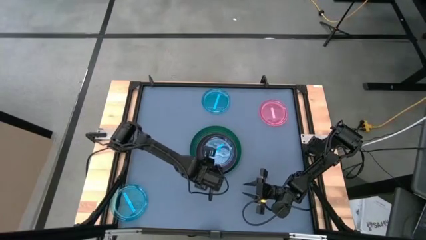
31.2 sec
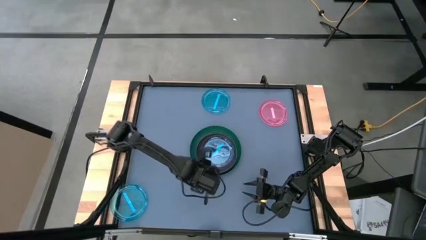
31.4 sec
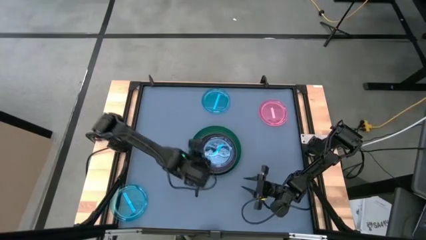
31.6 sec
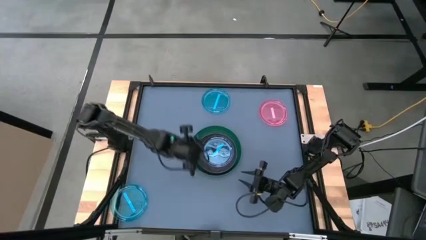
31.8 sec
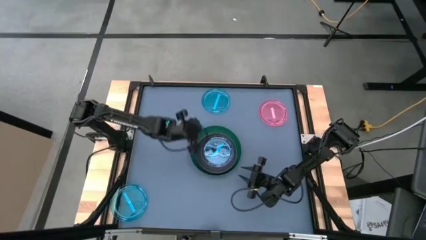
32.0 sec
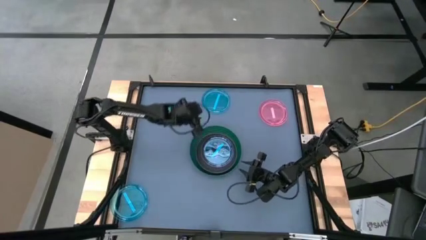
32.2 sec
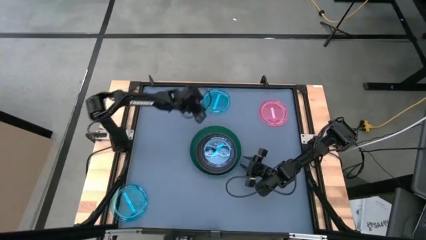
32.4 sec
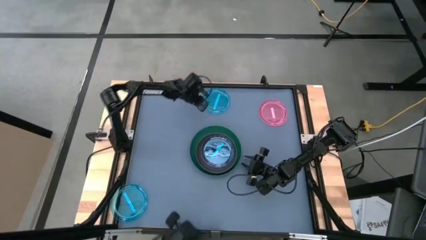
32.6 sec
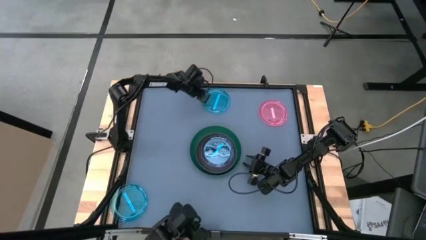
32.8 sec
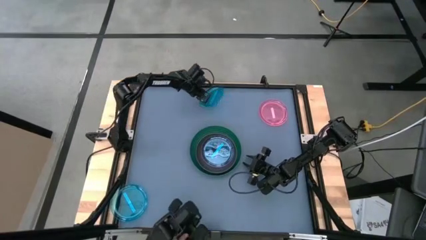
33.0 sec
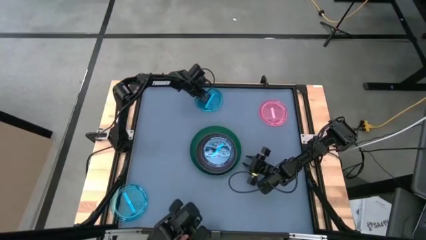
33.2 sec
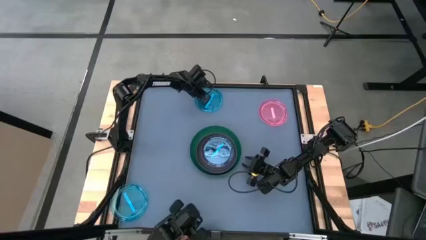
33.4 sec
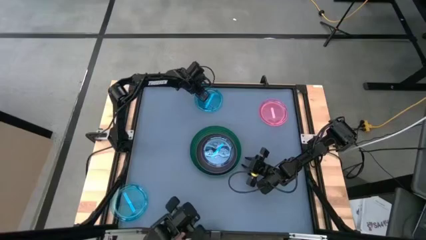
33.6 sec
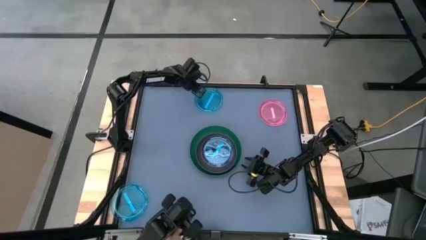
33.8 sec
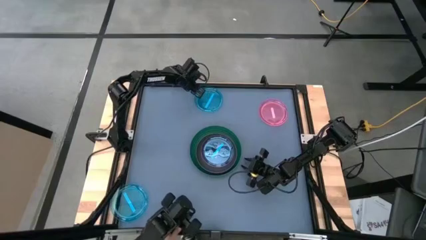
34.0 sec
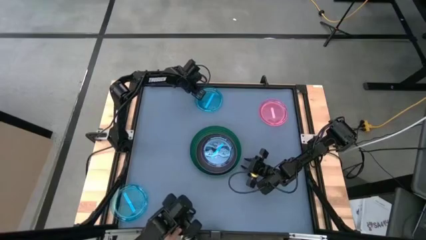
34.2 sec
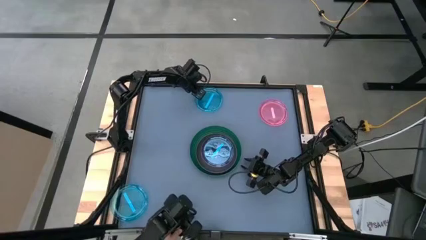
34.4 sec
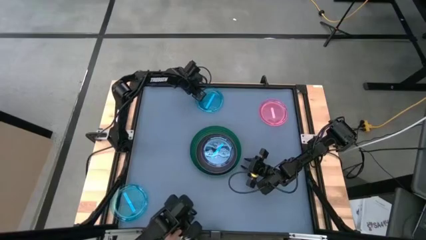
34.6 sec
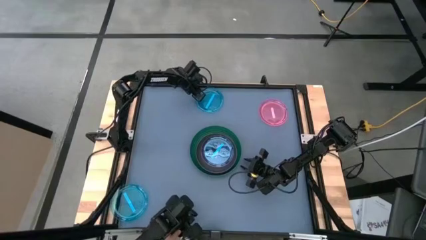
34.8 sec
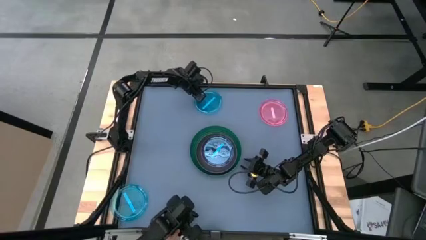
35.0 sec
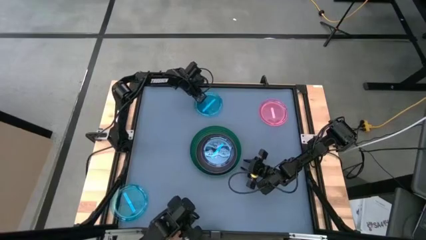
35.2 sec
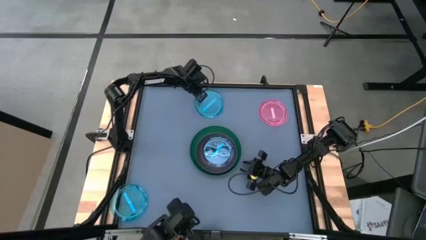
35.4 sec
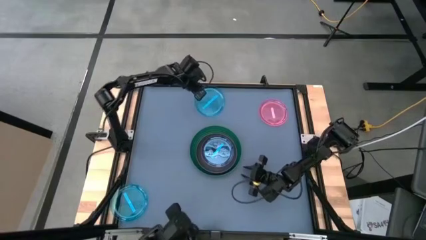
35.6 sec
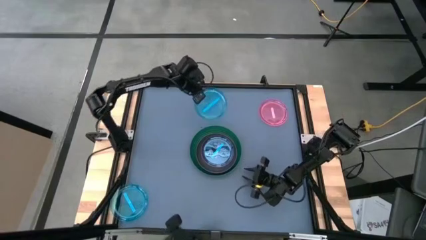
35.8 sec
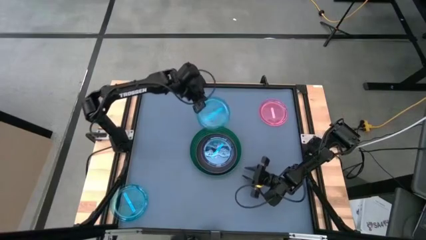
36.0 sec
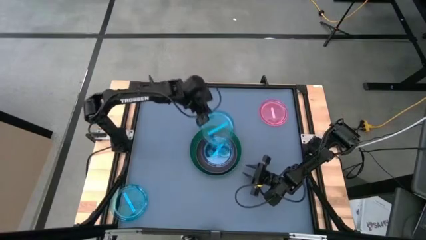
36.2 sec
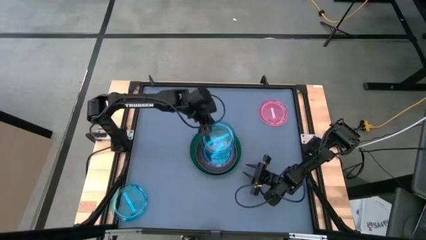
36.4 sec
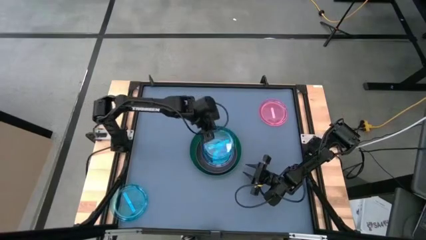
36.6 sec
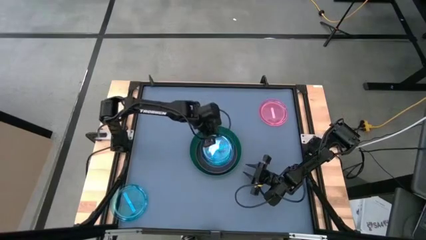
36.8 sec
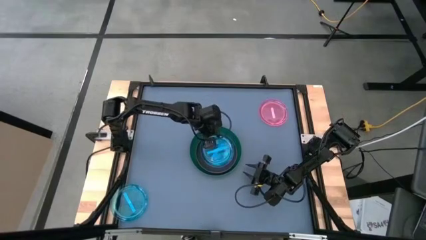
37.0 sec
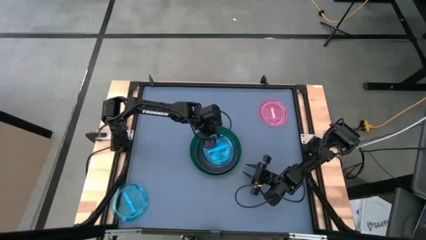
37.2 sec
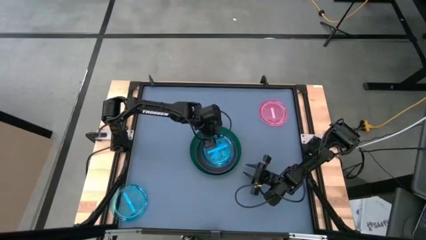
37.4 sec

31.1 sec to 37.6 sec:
Task: Stack plastic plates
Stack the top light blue plate on top of the light blue plate

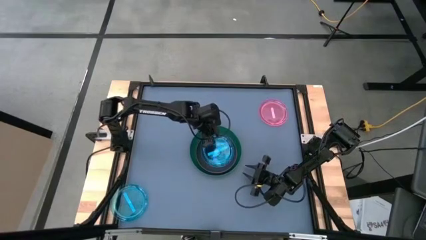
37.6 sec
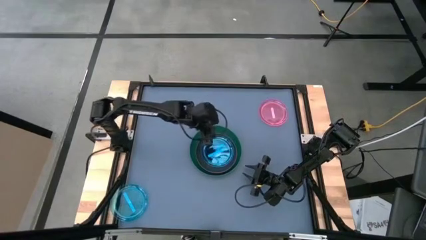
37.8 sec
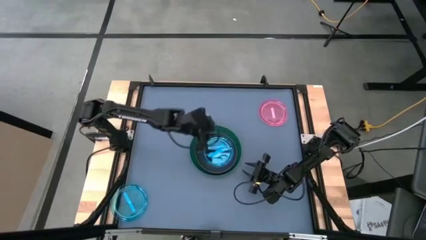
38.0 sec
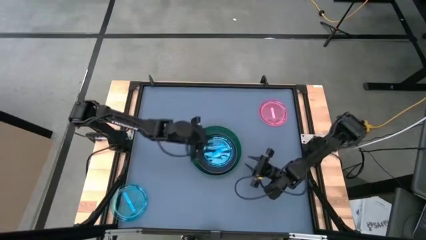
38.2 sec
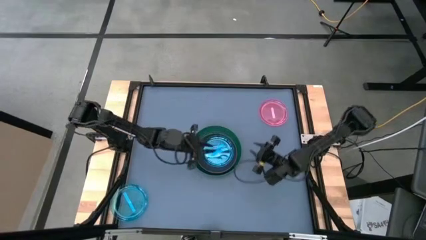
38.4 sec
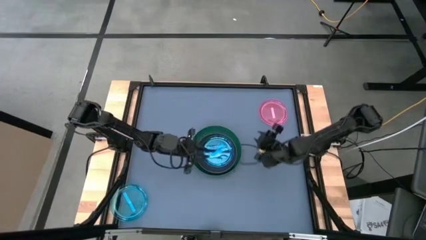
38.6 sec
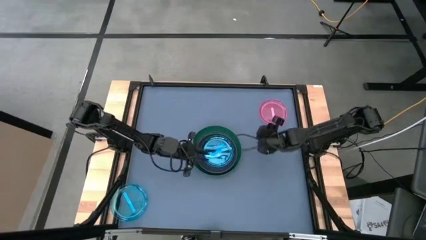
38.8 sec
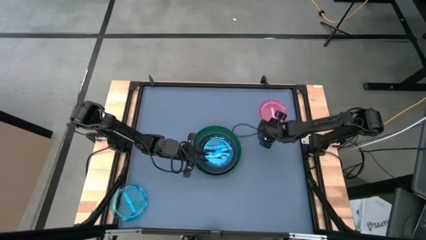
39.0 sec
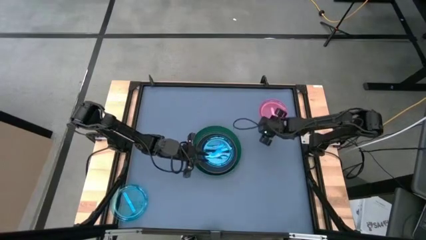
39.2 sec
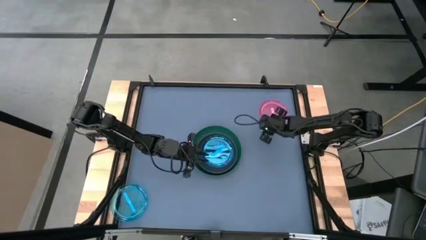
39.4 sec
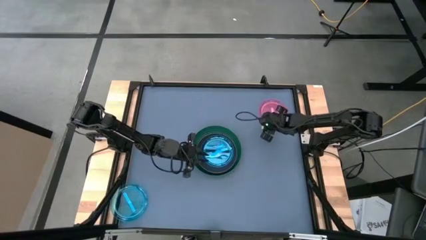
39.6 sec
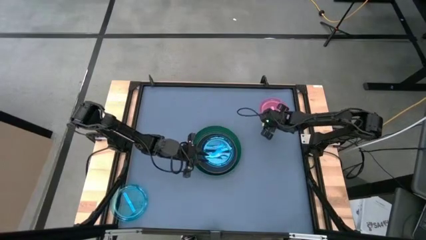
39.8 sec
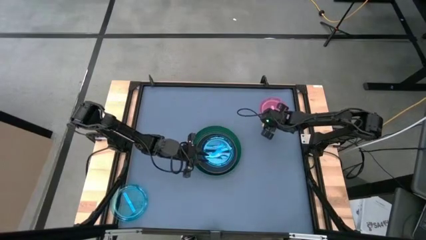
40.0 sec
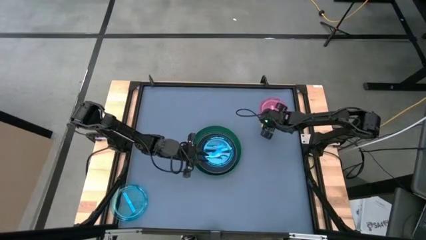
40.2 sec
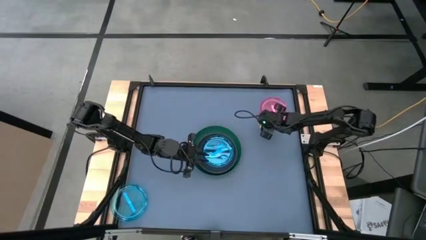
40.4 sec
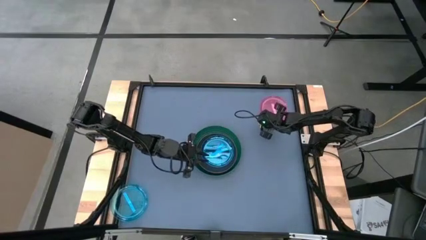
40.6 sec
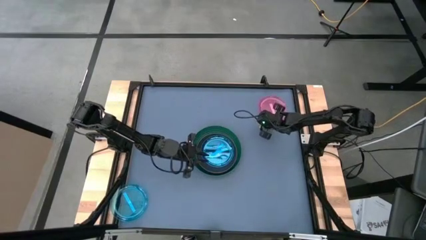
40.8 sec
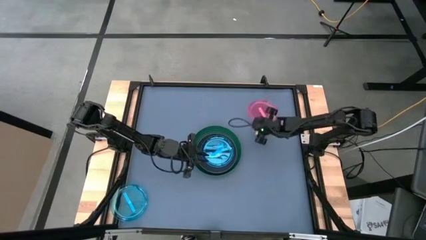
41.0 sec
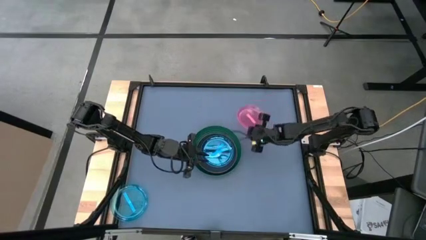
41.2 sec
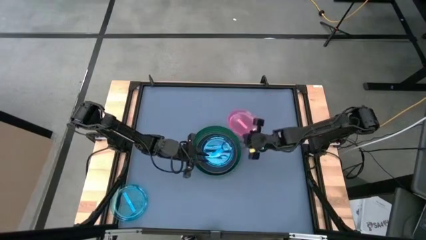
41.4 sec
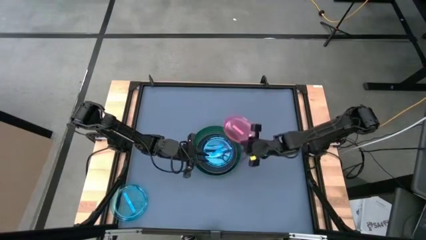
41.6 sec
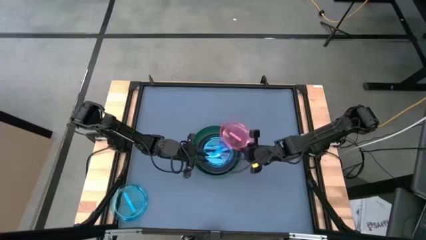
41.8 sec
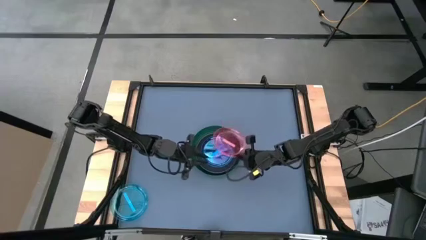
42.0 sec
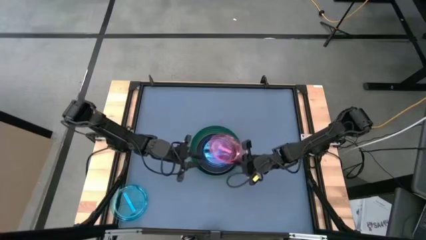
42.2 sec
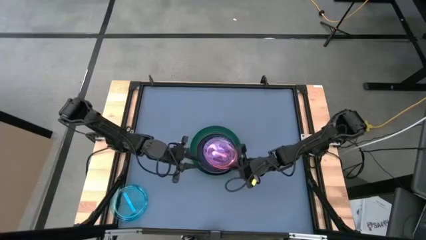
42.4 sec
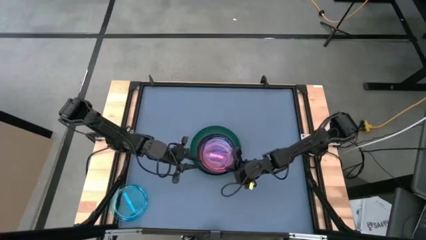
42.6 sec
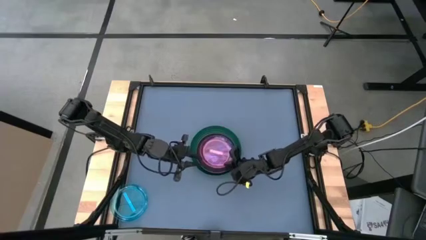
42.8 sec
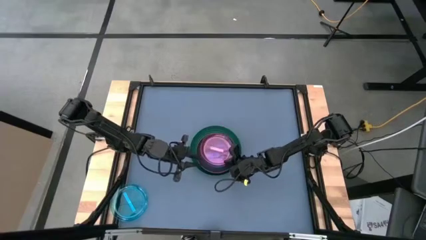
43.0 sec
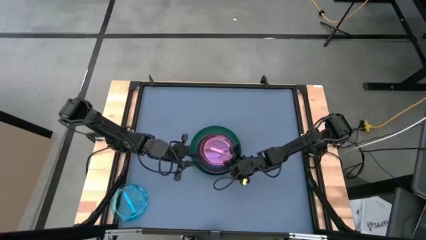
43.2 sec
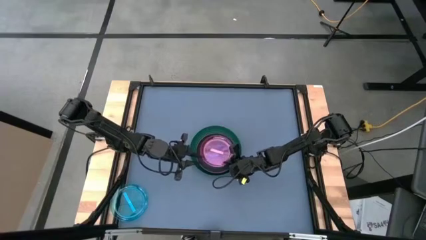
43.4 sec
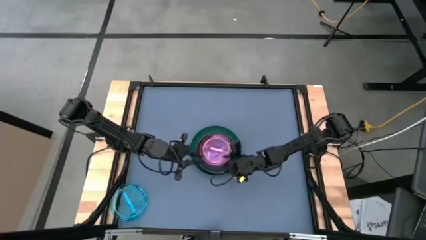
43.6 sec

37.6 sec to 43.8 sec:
Stack the light pink plate on top of the light blue plate

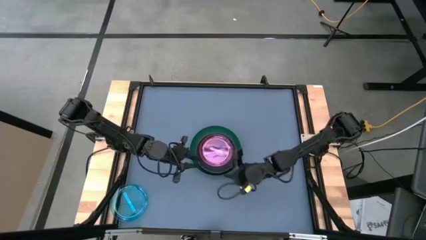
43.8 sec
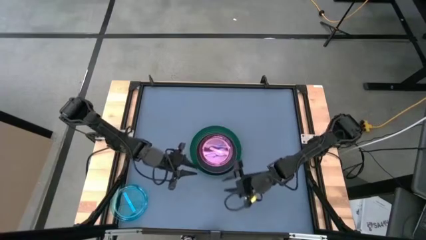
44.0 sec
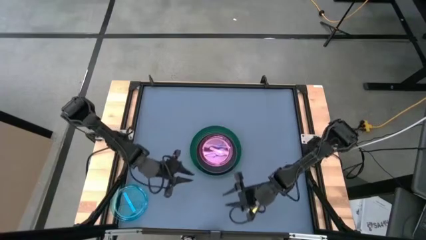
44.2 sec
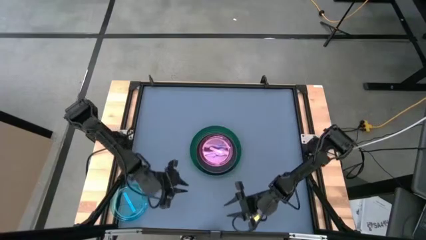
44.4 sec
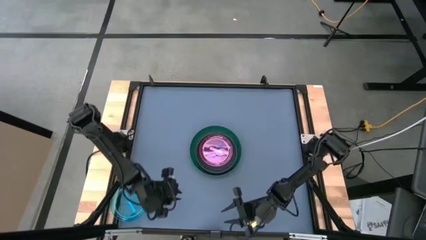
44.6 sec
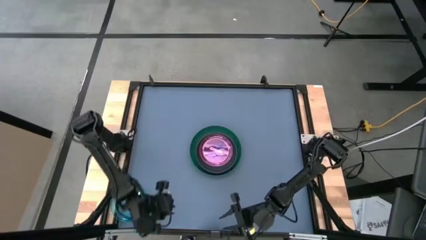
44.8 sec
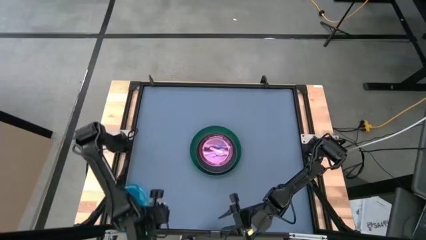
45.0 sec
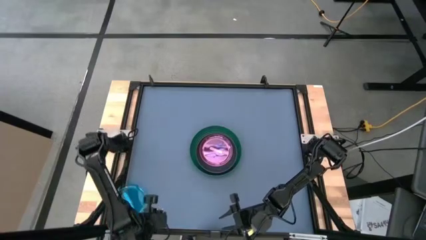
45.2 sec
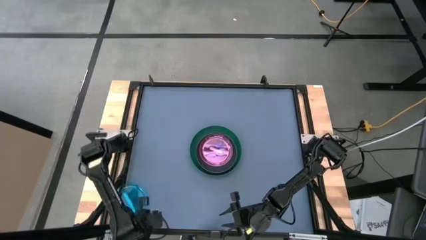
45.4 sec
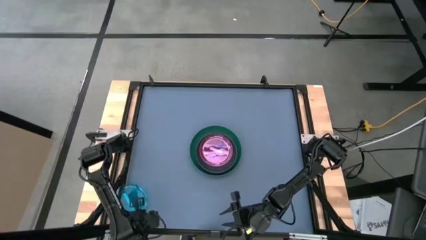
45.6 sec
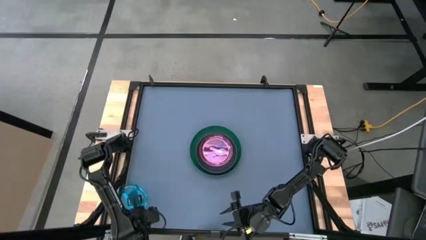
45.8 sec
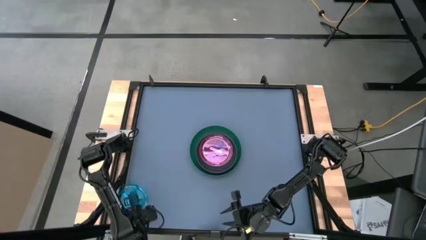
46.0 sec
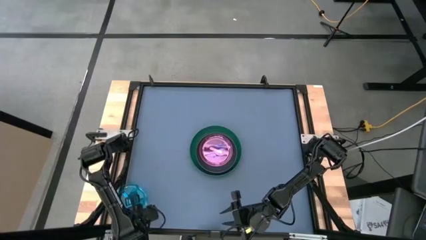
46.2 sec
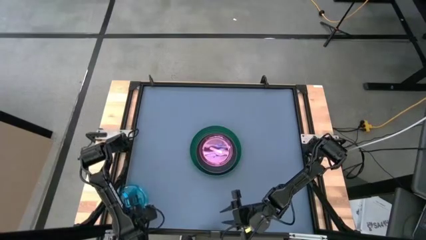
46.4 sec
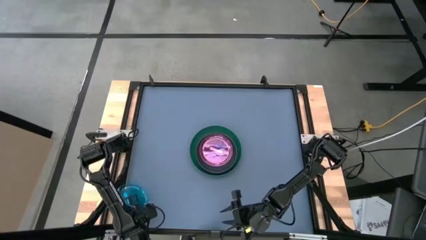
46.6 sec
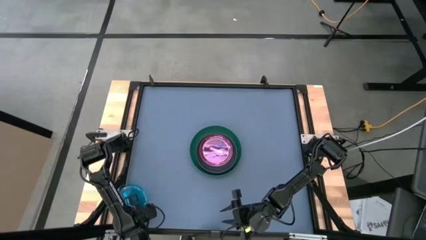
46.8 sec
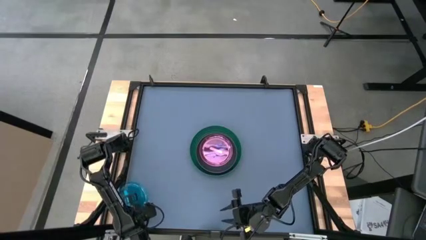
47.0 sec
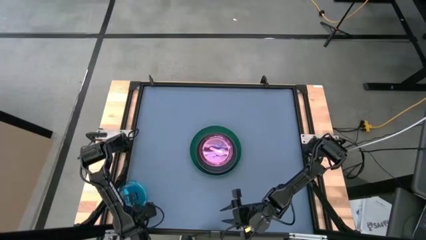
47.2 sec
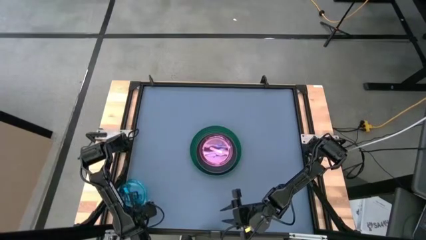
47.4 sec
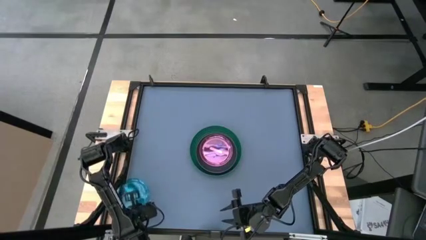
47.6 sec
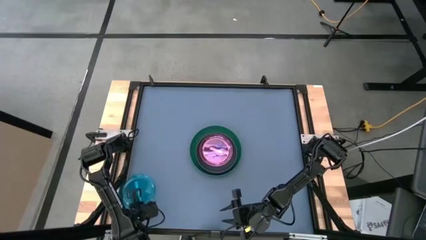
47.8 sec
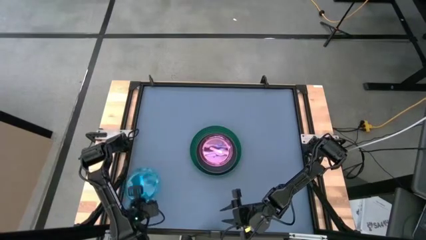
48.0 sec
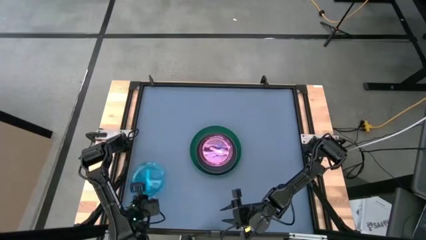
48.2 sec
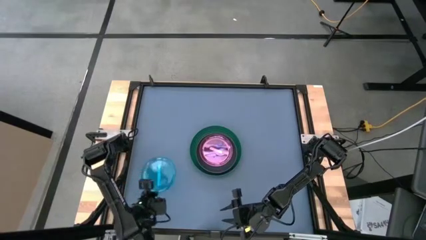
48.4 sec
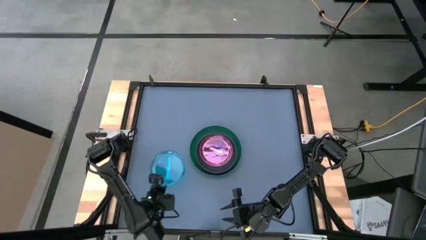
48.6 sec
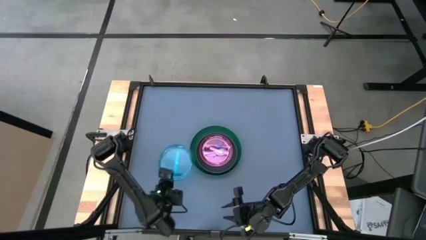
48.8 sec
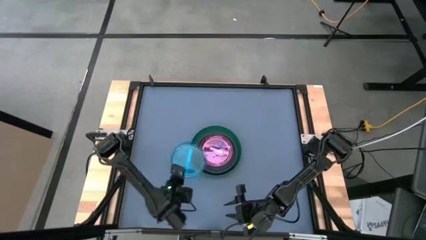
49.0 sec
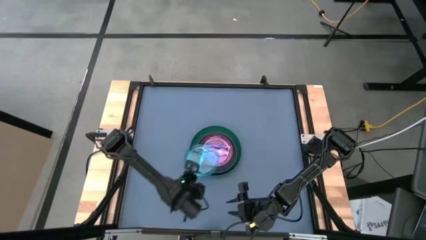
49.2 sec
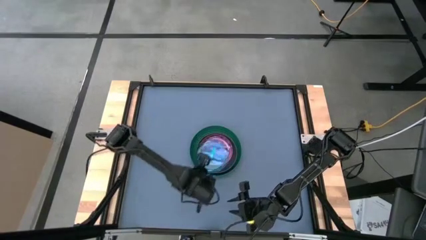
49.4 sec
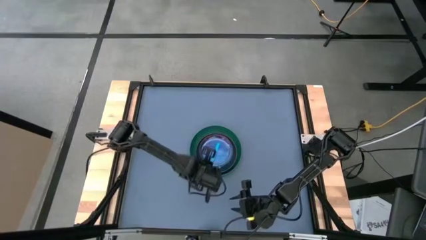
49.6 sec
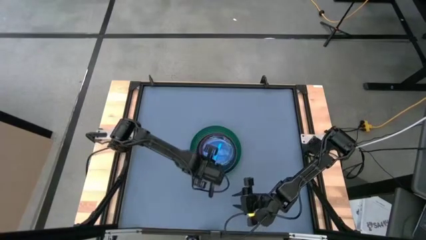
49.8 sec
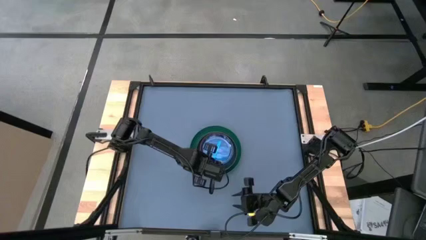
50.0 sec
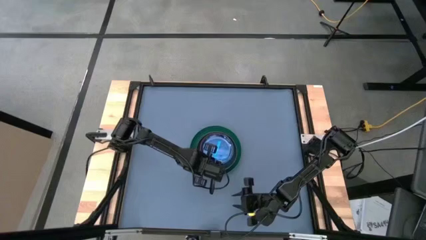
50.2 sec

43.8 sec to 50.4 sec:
Stack the light blue plate on top of the light pink plate
